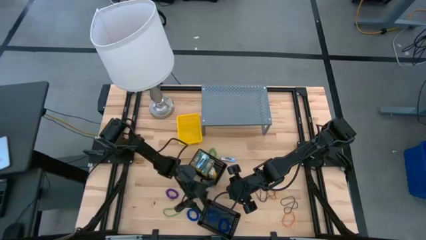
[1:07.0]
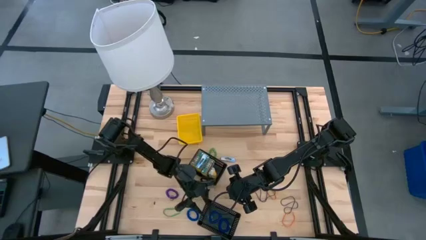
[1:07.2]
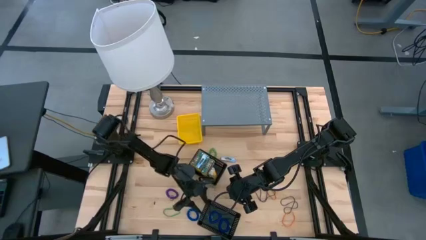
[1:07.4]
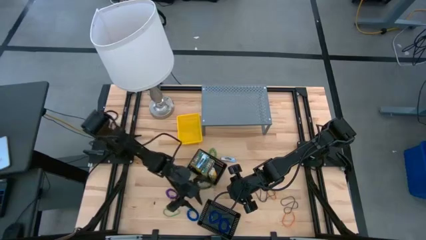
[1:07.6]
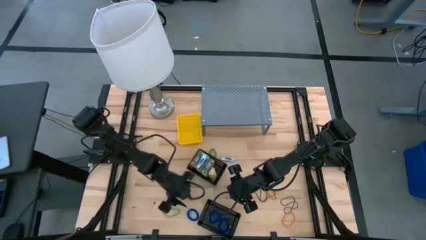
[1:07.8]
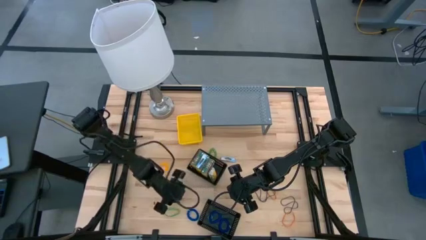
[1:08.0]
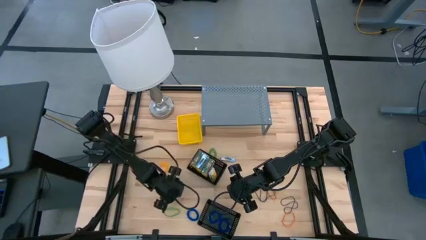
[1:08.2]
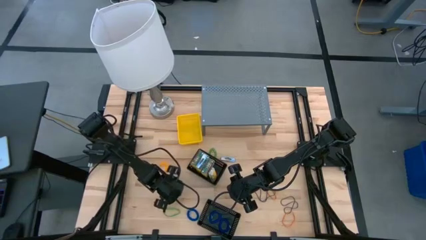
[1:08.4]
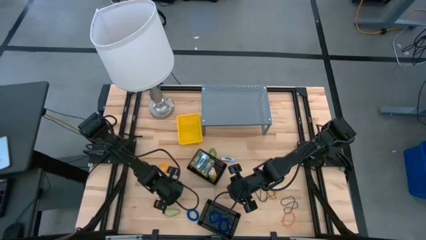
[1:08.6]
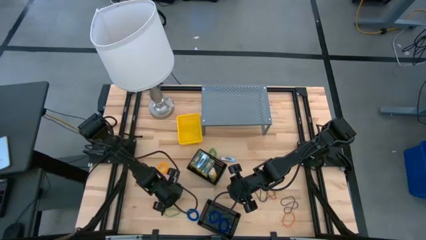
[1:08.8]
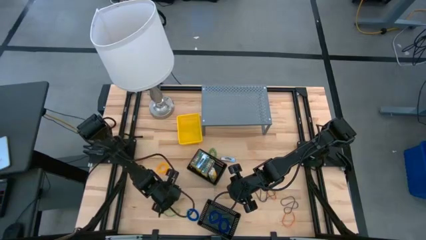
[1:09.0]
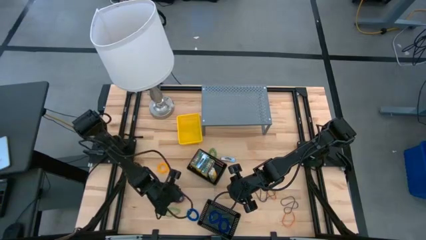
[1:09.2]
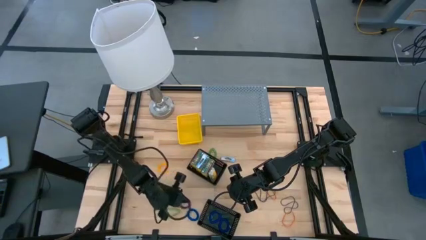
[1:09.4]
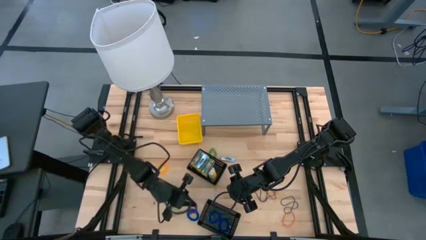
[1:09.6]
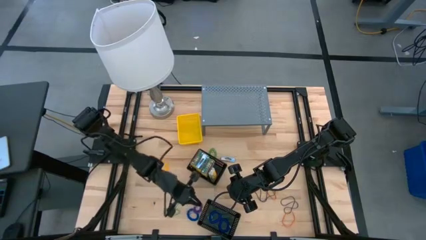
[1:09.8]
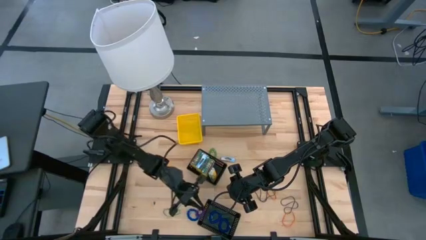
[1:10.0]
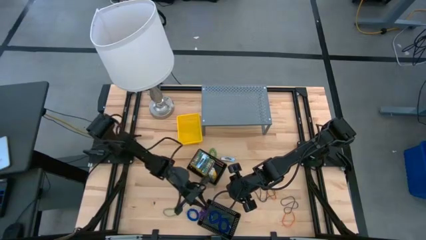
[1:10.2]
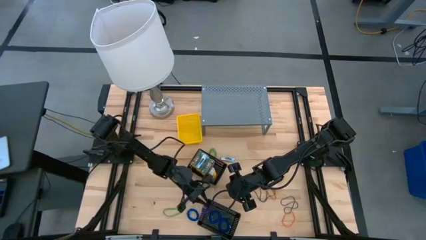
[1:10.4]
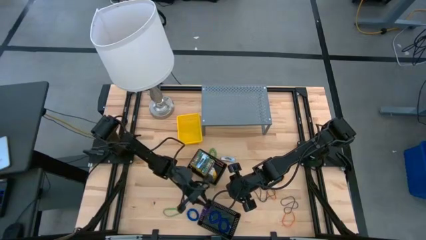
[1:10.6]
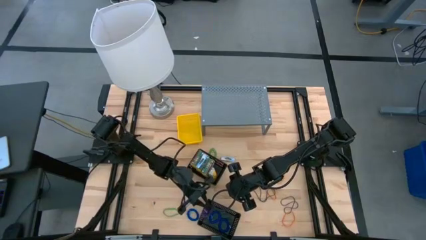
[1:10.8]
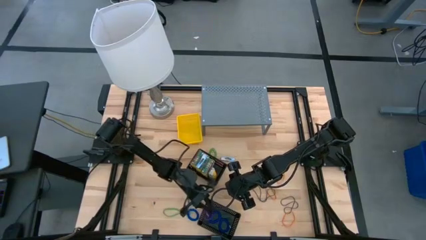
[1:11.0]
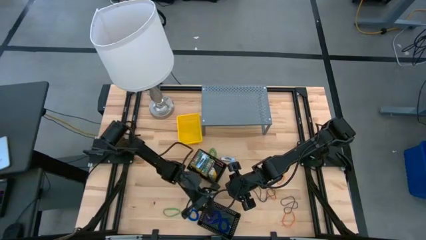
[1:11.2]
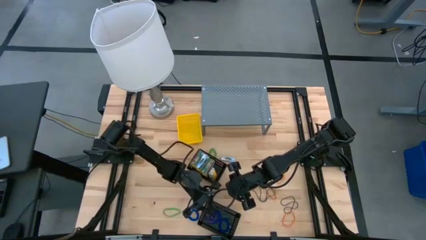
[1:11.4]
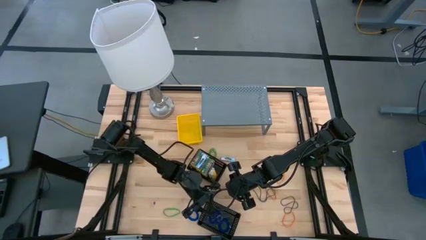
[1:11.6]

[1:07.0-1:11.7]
Task: Pick & Place Office Desk Supplies
Put the purple spring keychain into the bottom black bin

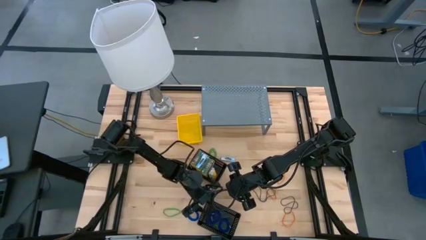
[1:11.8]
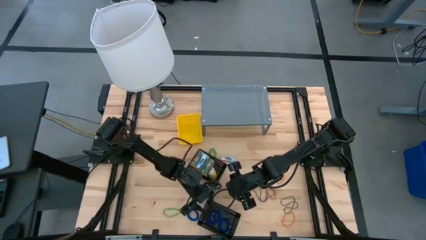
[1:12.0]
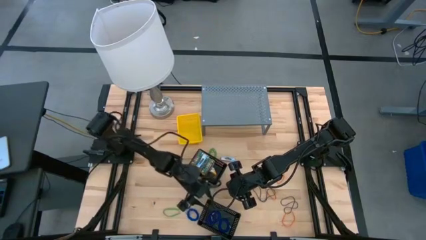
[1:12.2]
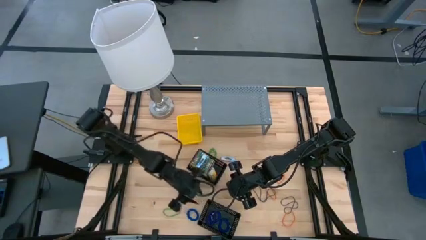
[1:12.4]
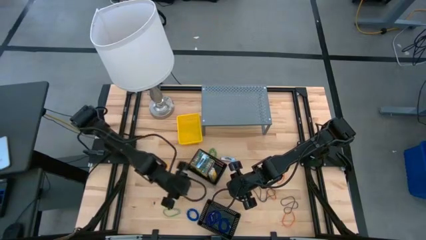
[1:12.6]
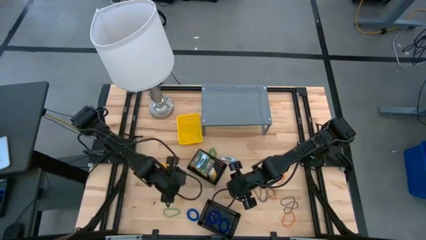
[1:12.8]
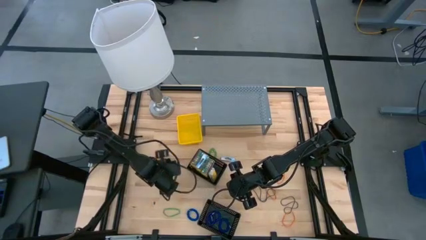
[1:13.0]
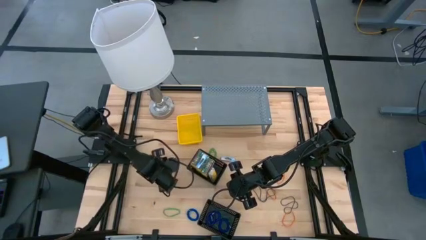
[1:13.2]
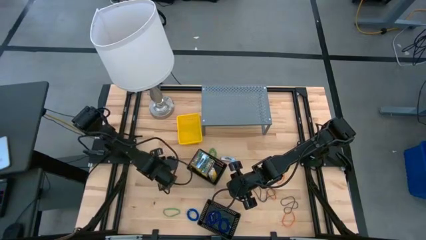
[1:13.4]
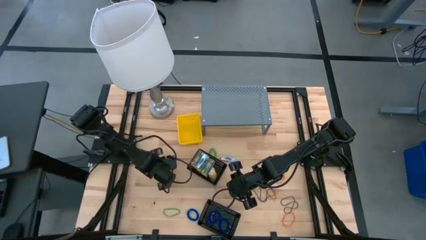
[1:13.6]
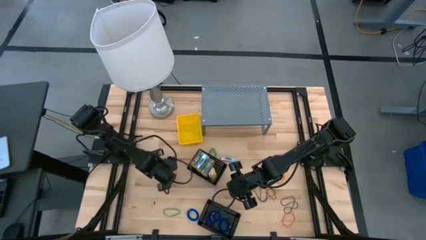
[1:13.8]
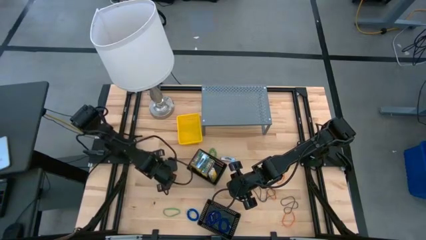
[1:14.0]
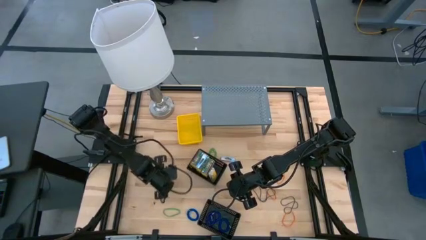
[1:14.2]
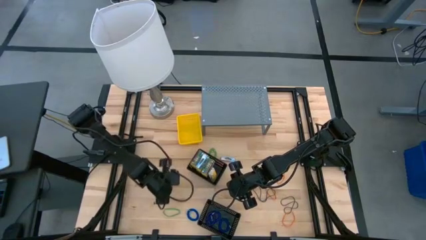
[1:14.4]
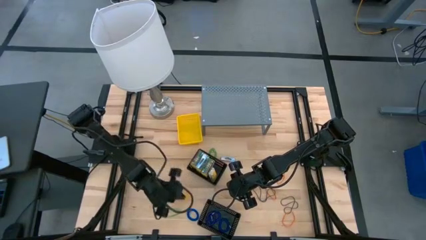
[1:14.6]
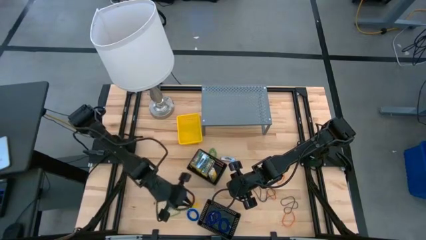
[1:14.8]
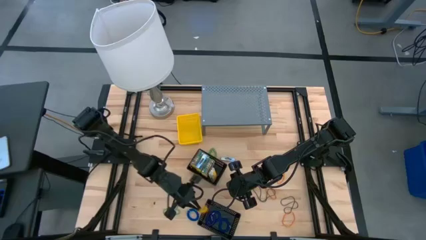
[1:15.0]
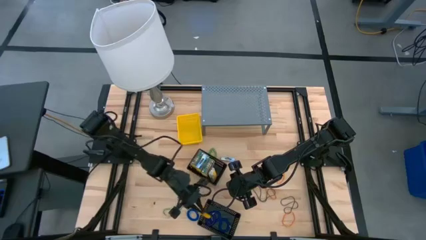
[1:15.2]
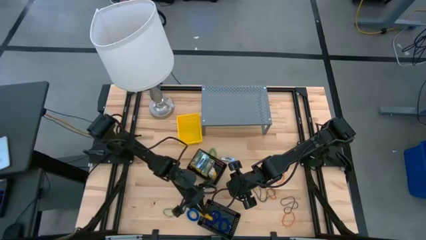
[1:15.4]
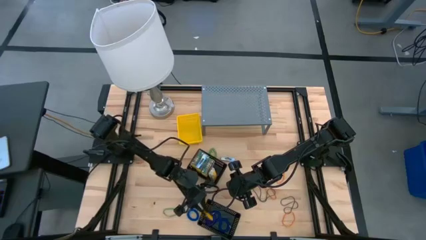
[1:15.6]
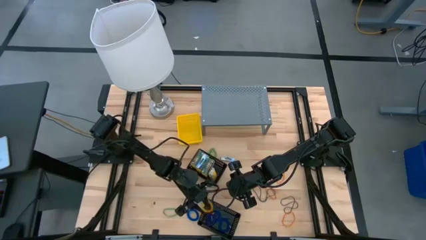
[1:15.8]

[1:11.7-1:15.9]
Put the yellow spring keychain into the bottom black bin

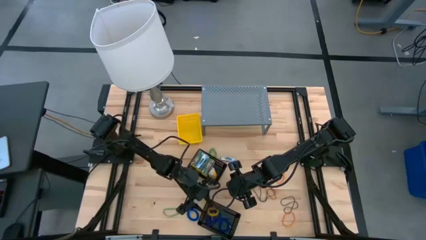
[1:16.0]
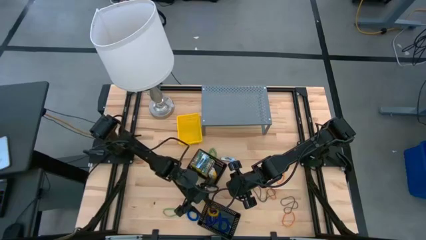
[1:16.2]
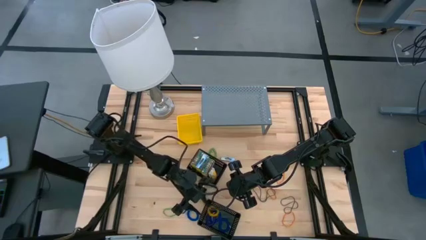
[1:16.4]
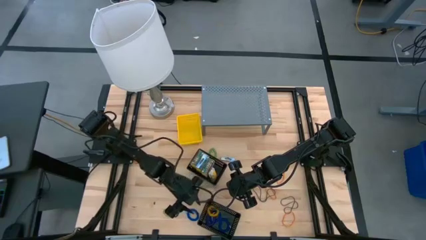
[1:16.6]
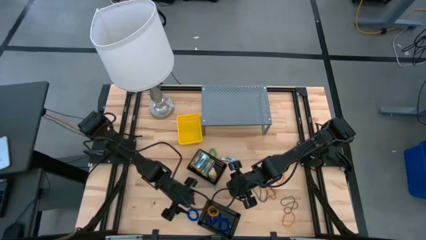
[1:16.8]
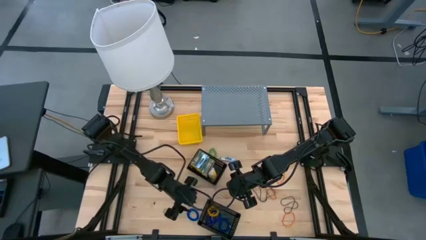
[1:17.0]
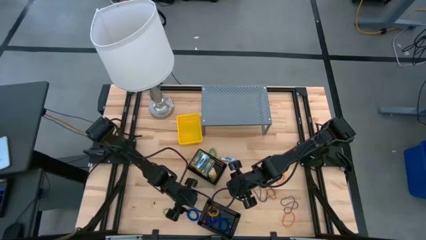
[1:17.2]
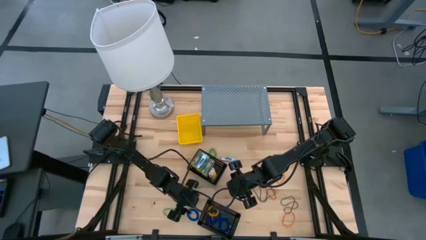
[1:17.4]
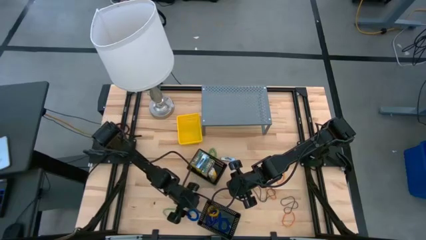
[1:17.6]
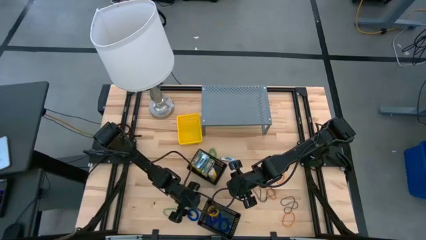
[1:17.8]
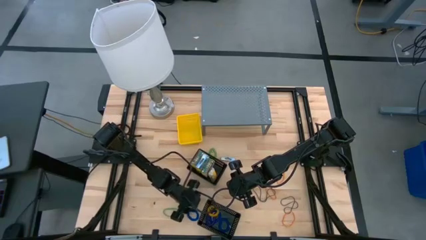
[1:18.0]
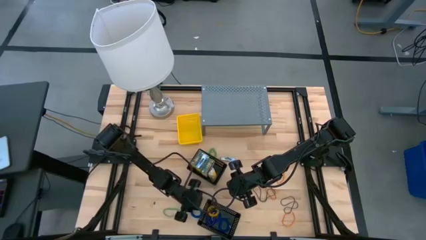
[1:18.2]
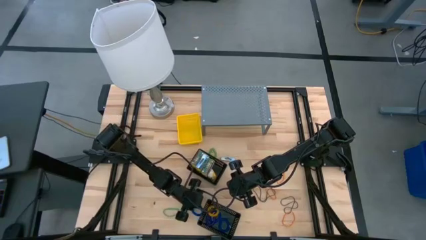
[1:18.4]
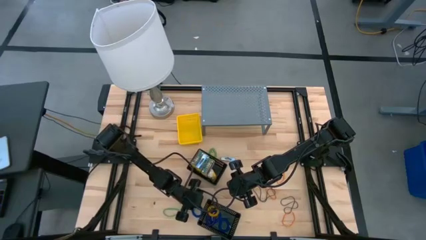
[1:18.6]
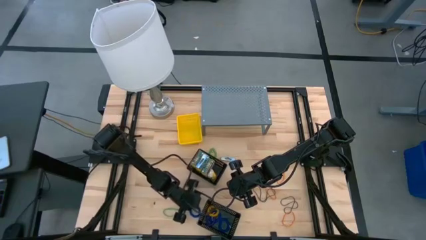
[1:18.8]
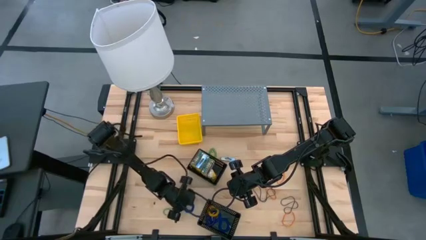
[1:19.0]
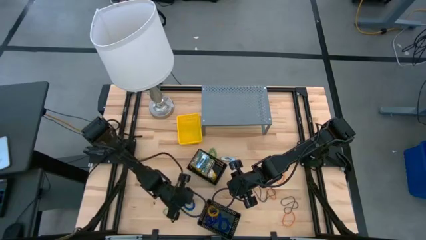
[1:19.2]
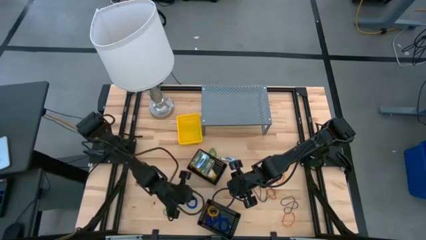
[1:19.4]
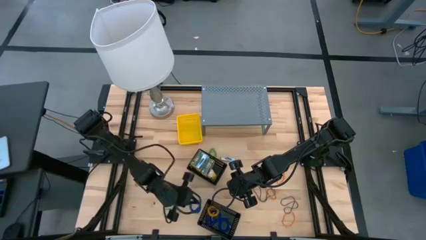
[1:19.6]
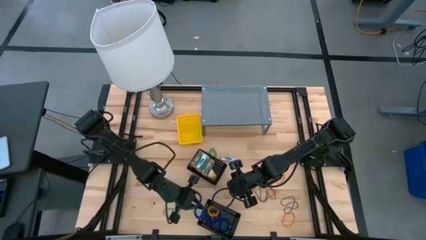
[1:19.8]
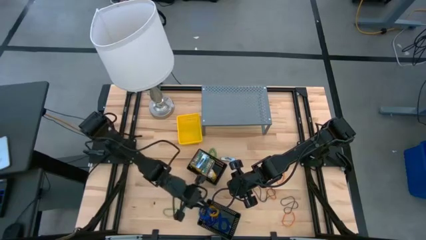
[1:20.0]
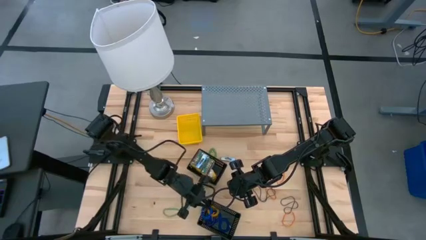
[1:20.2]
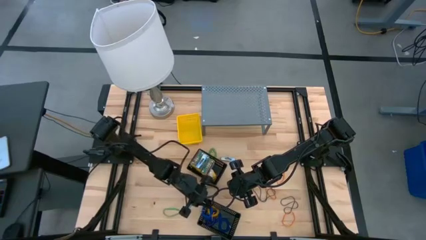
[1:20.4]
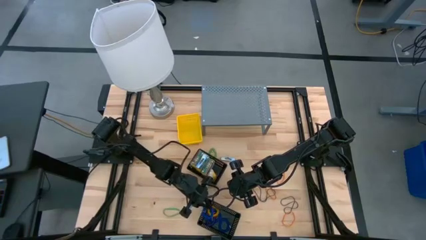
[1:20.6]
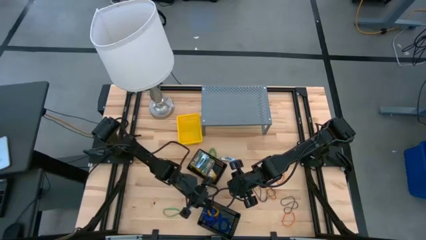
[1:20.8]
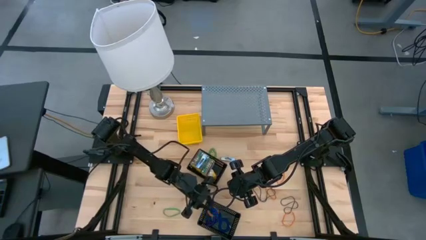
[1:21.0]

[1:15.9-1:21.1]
Put the blue spring keychain into the bottom black bin

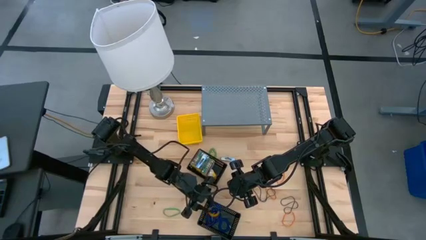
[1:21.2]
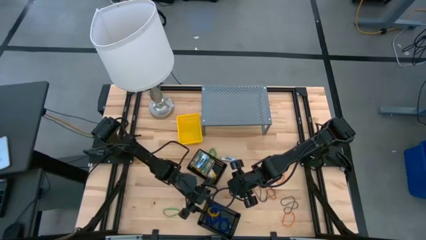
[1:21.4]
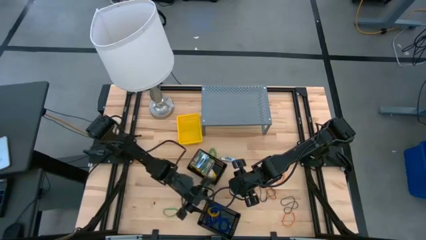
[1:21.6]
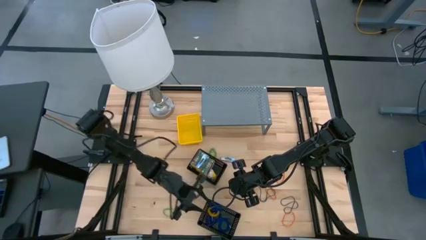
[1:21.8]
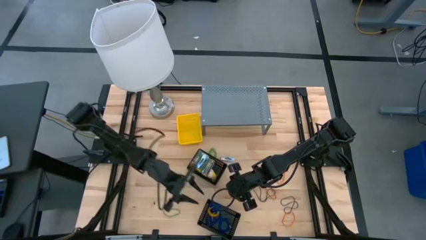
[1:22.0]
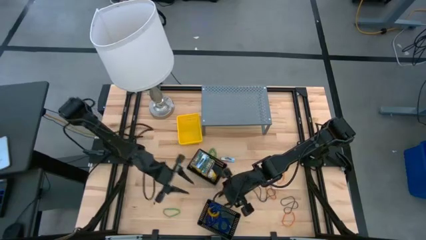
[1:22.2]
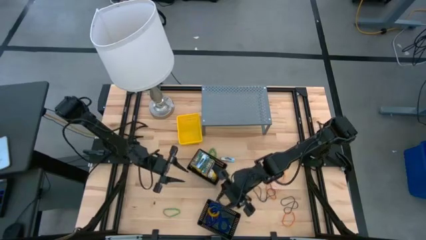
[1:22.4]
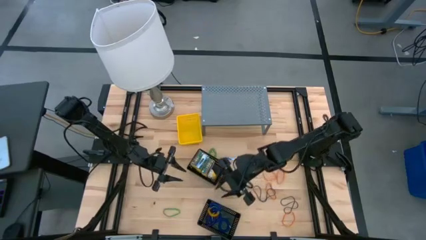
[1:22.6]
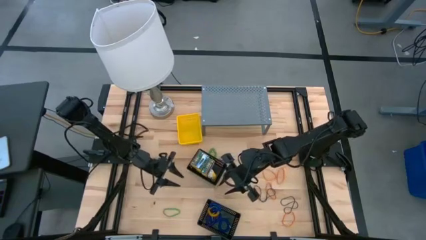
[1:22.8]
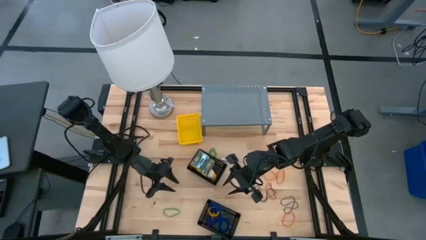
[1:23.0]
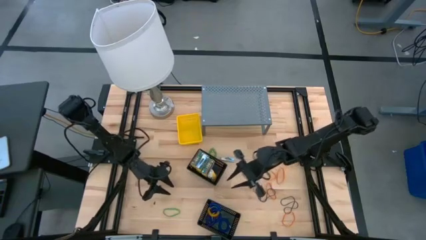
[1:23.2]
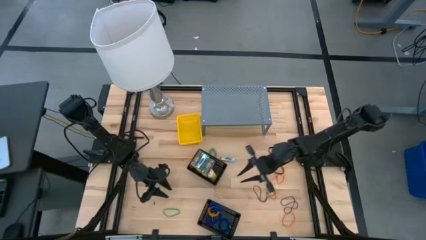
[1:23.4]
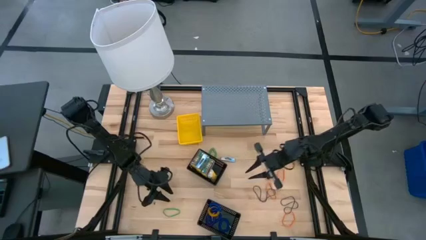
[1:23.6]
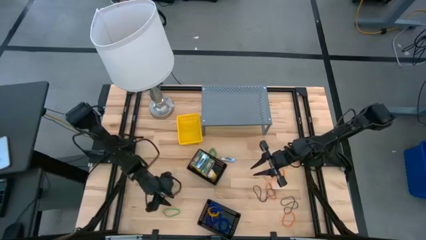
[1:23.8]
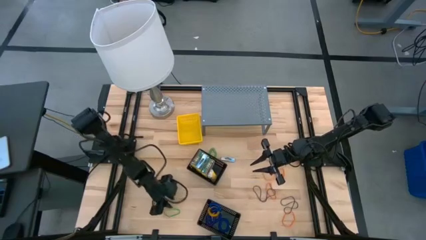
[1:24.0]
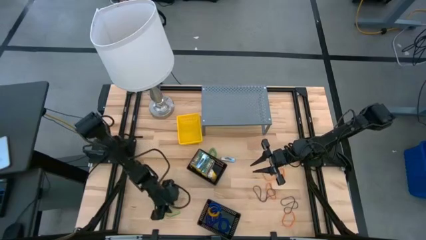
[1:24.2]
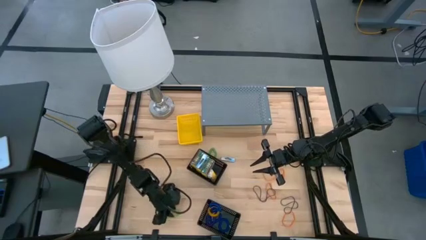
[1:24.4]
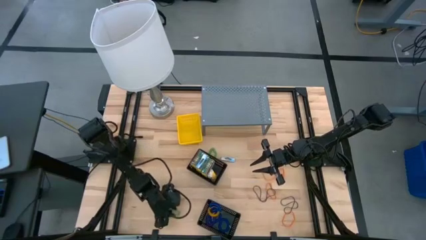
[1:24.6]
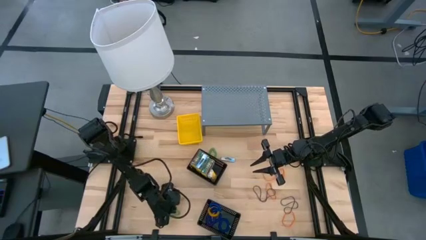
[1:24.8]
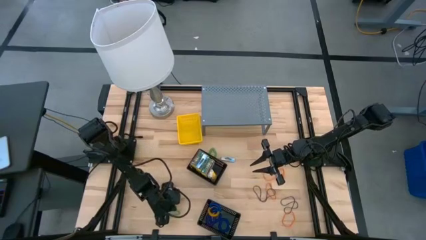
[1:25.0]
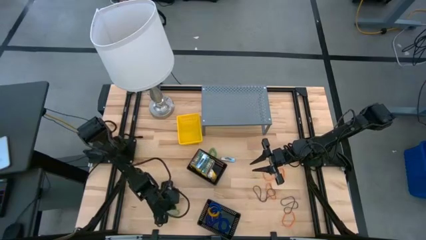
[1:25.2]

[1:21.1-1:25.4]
Put the green rubber band into the yellow bin
